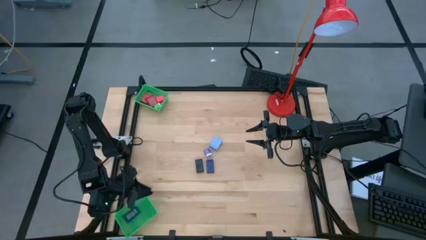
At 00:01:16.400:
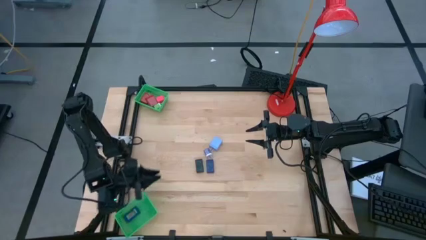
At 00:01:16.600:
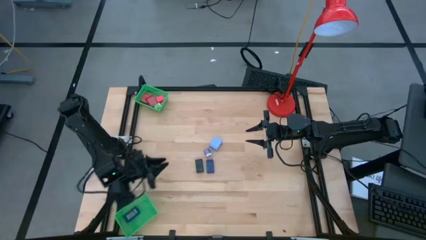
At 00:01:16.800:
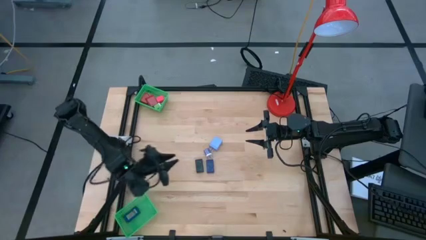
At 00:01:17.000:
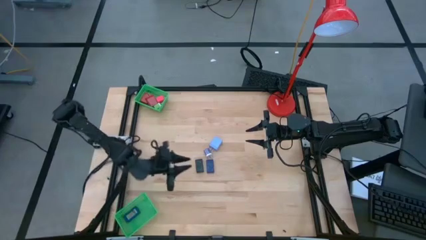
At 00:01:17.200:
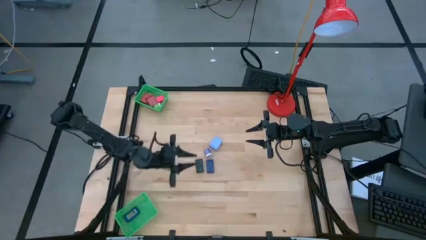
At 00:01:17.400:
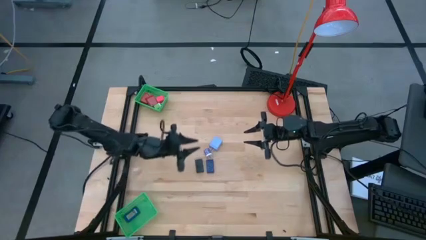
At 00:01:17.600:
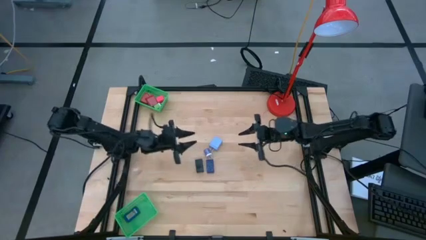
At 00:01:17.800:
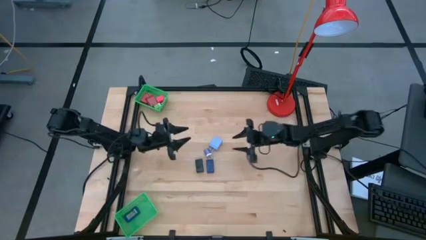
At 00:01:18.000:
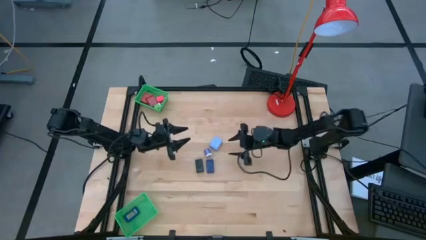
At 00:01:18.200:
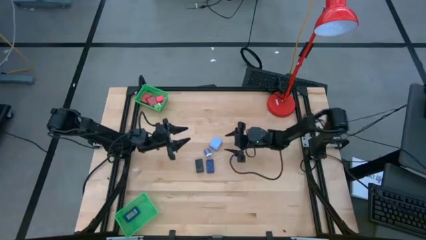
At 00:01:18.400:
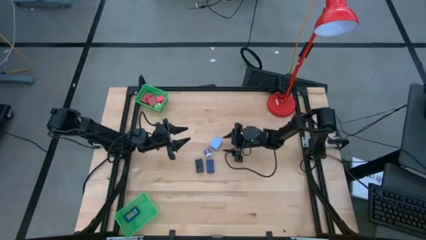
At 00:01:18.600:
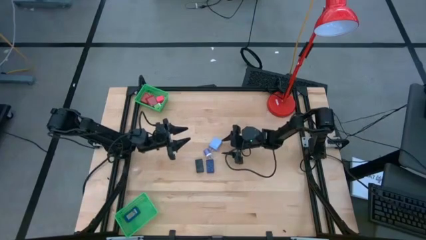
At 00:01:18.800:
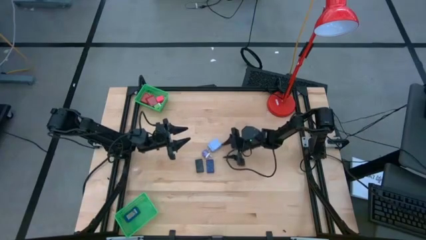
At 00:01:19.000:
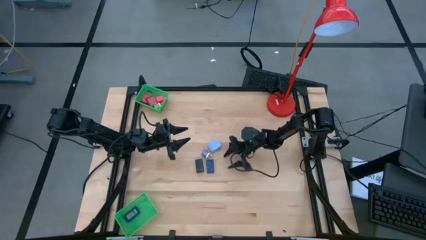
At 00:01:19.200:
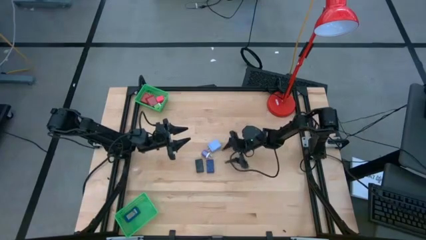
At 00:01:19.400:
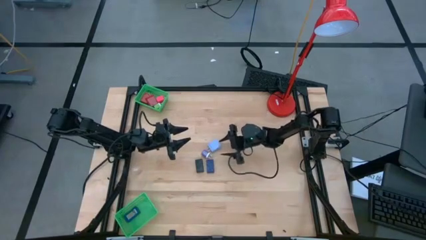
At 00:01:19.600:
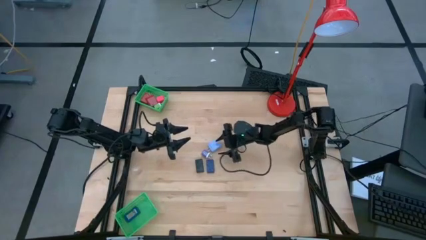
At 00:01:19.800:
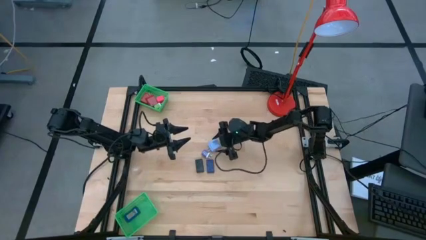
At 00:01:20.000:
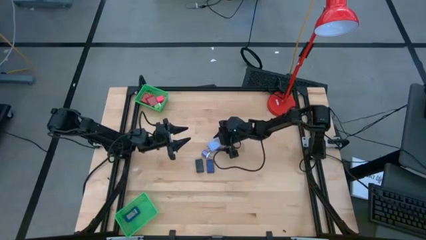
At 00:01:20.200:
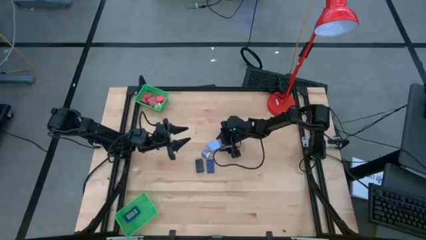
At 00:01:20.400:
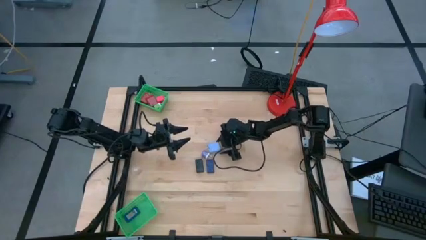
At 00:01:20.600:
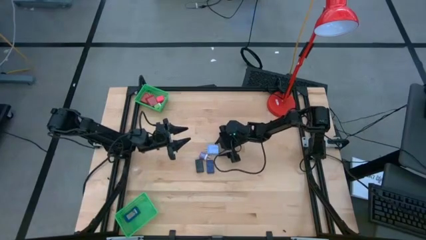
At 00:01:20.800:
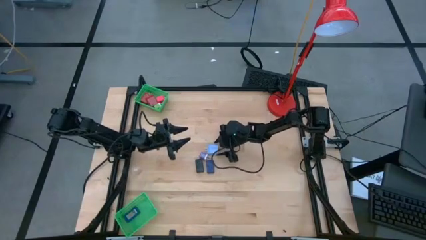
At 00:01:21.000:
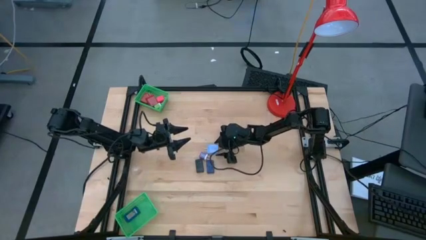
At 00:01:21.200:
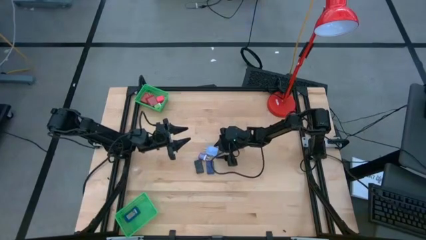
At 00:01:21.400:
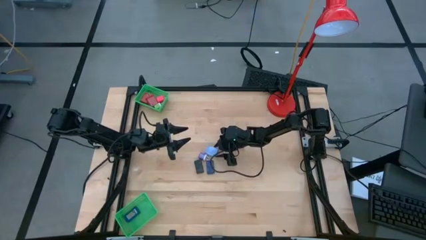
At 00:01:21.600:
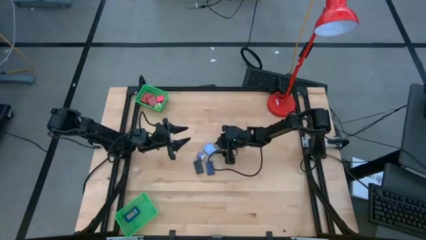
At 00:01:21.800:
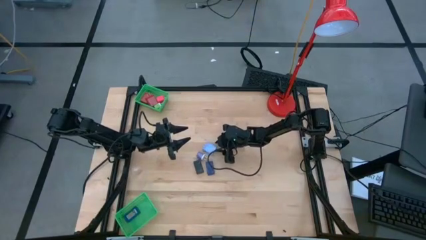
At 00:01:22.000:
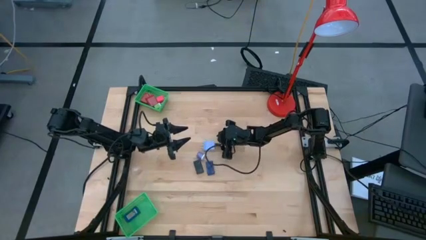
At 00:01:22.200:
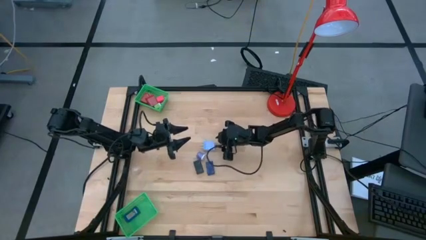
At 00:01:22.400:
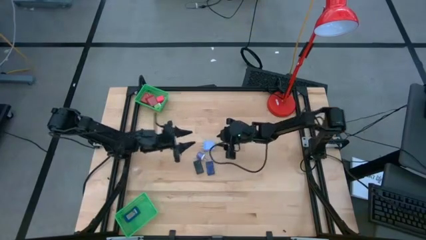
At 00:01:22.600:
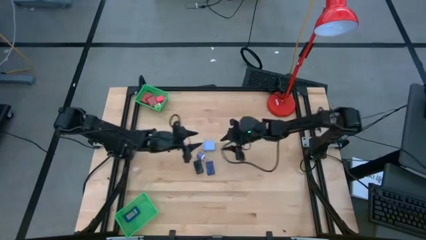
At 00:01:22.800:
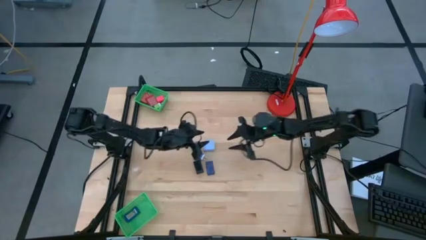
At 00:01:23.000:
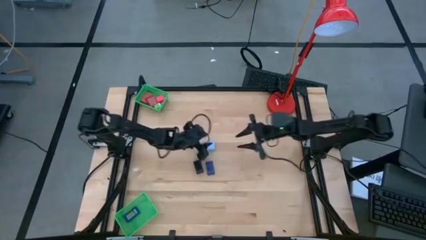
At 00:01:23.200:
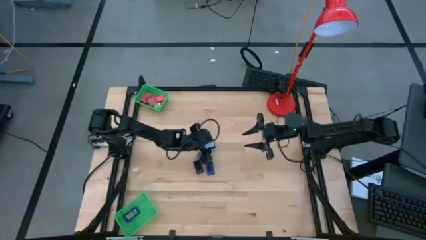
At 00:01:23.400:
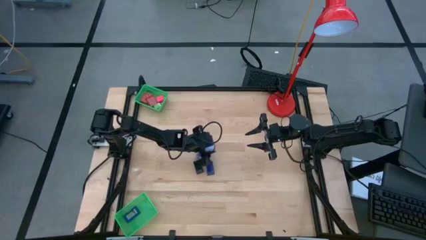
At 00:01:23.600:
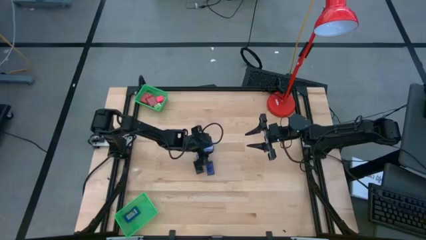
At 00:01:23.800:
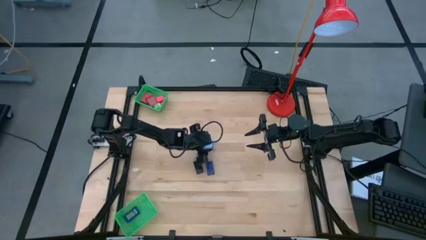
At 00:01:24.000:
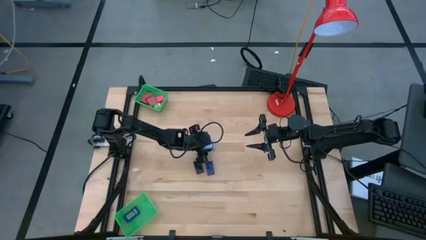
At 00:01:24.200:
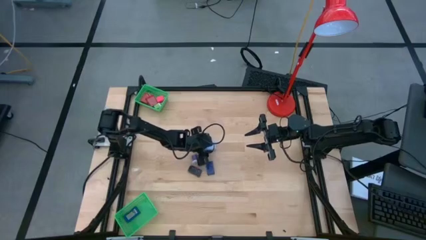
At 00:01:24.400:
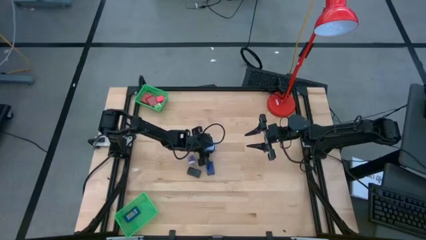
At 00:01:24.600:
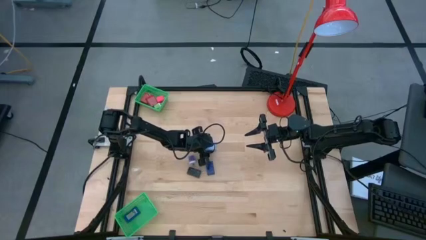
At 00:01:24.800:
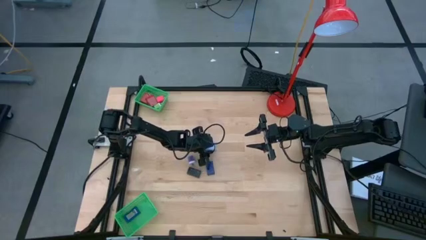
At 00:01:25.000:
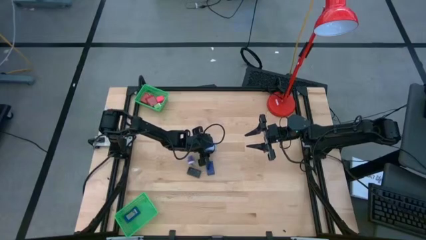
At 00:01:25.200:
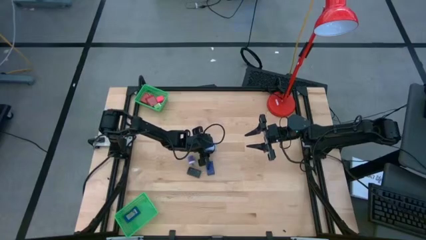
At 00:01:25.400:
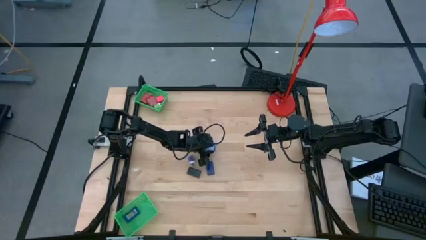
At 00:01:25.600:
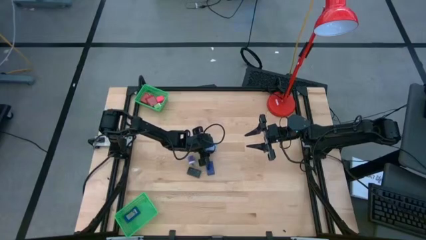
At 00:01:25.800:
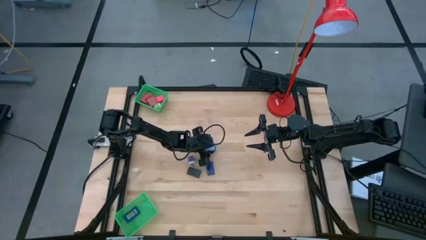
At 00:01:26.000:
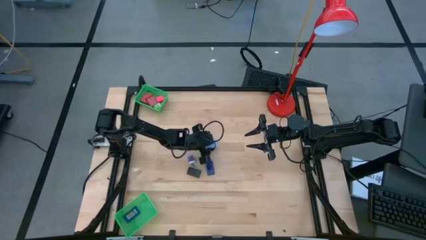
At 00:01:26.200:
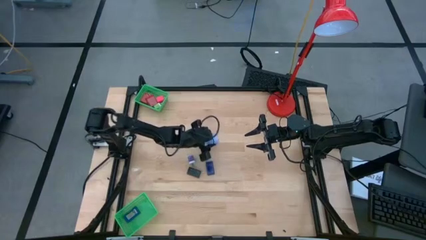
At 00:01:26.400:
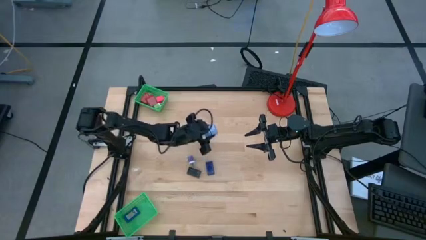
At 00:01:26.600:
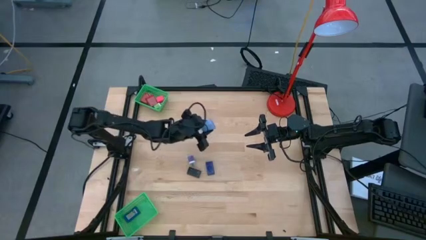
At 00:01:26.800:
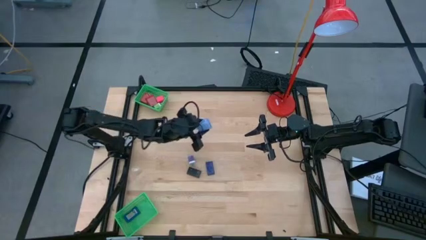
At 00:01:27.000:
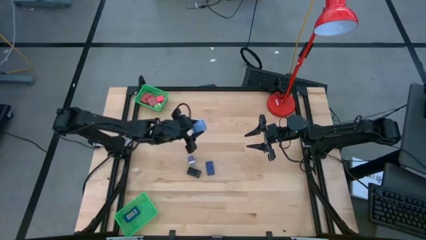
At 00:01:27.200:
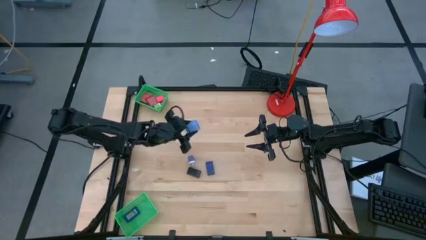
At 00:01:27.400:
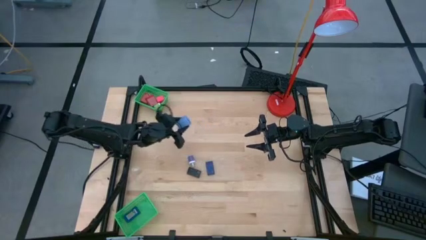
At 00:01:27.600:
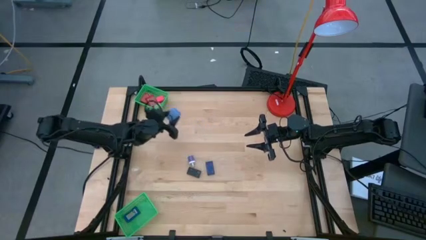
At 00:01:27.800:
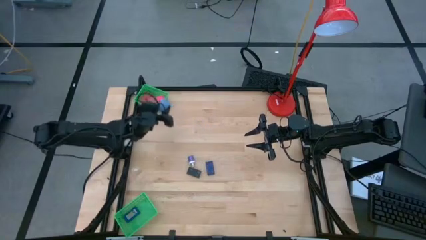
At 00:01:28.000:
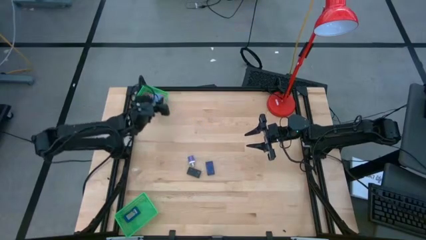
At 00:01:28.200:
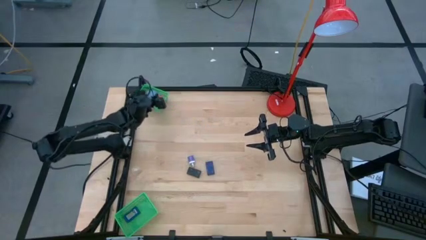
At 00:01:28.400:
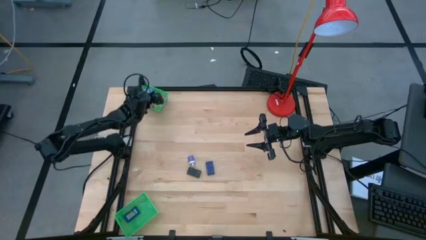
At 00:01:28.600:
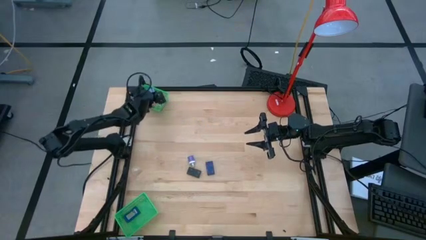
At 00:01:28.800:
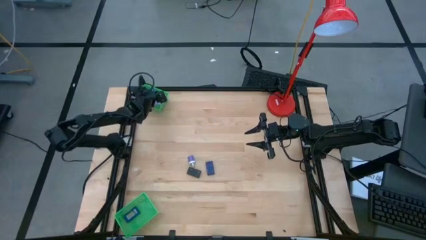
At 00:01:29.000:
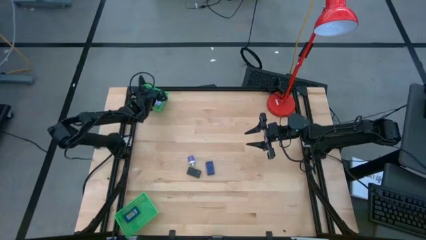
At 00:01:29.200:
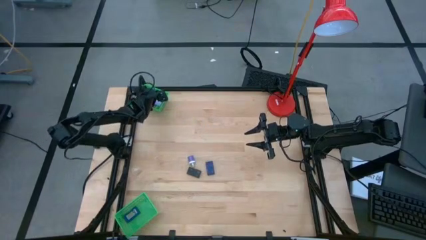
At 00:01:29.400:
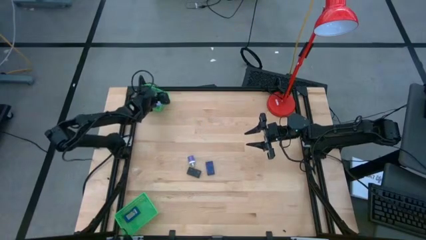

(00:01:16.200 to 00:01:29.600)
Task: Pick & Place Office items
Put the light blue charger adapter into the top green basket
